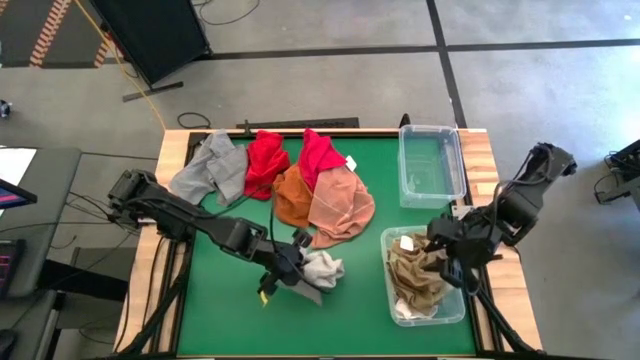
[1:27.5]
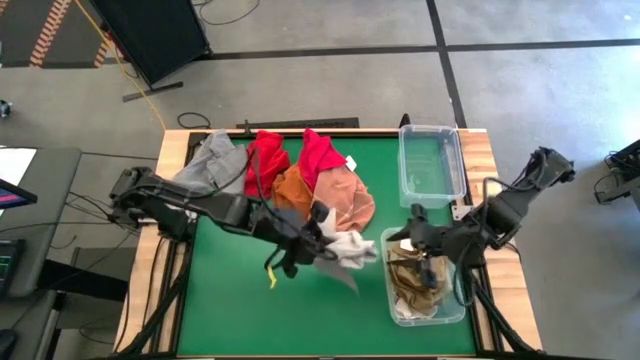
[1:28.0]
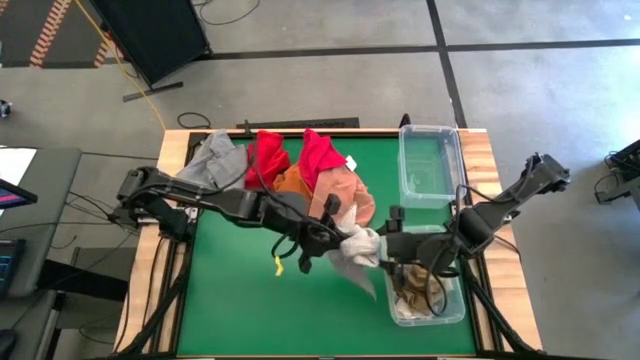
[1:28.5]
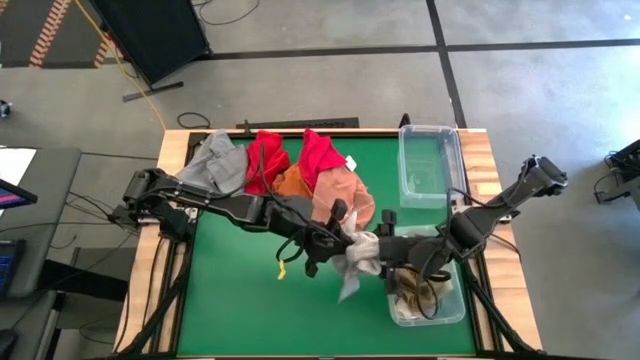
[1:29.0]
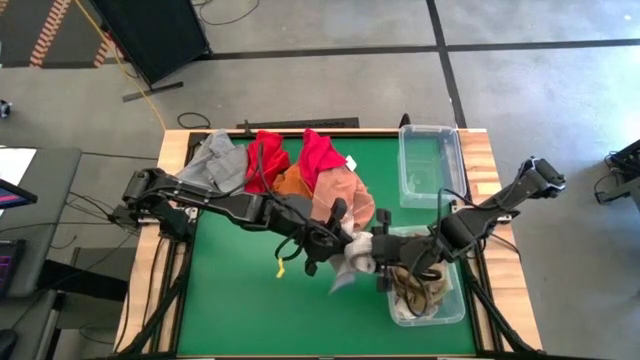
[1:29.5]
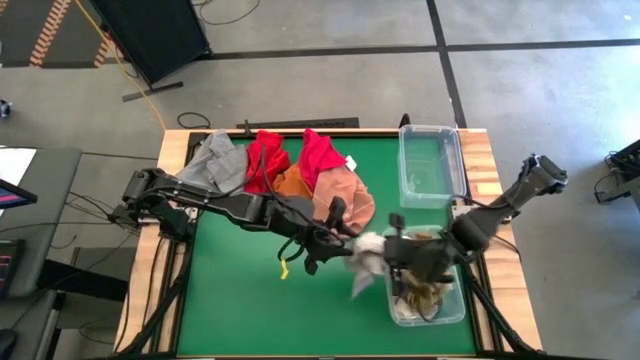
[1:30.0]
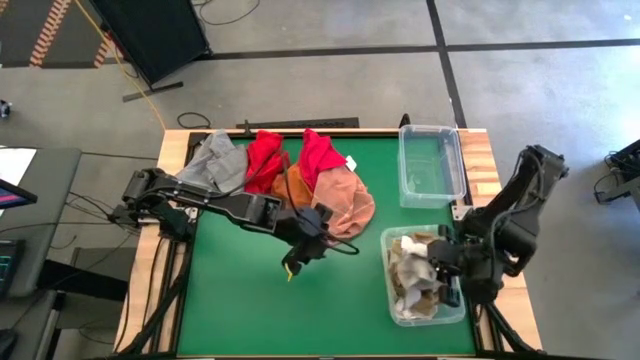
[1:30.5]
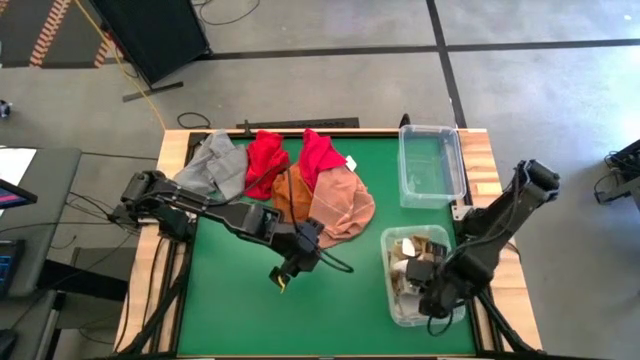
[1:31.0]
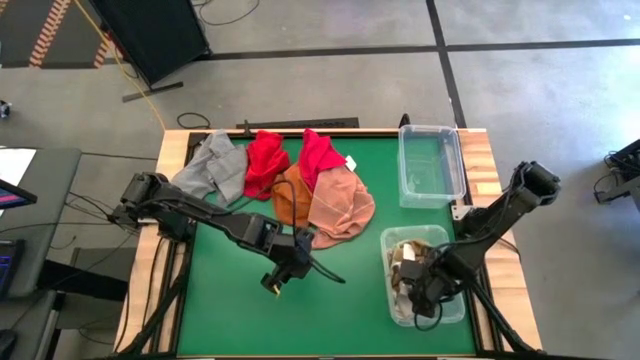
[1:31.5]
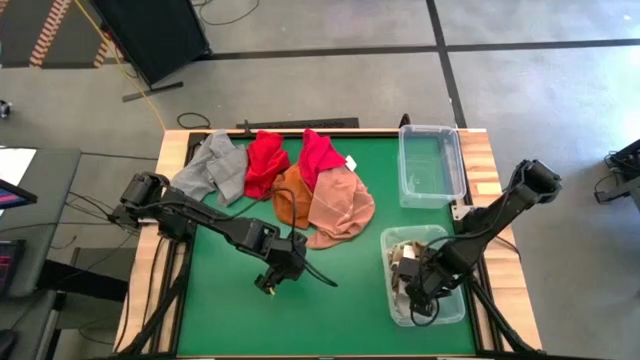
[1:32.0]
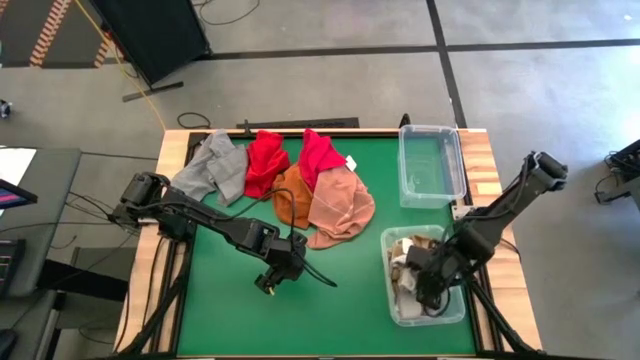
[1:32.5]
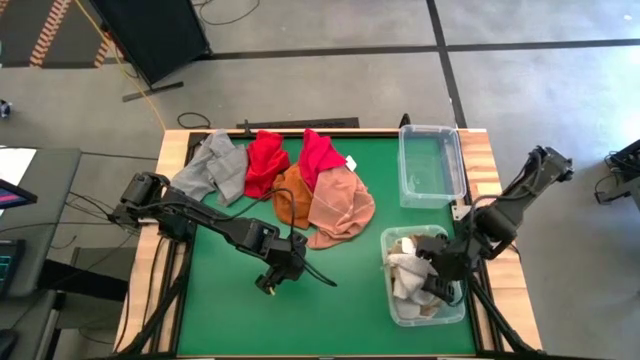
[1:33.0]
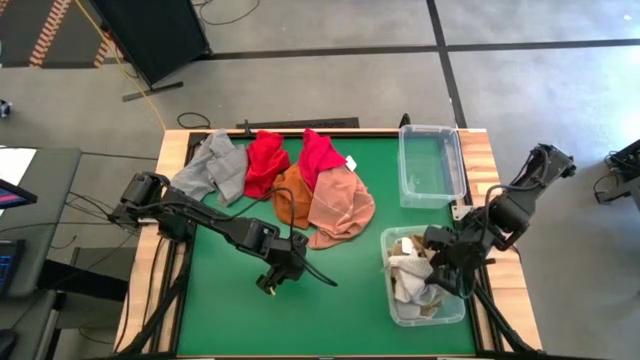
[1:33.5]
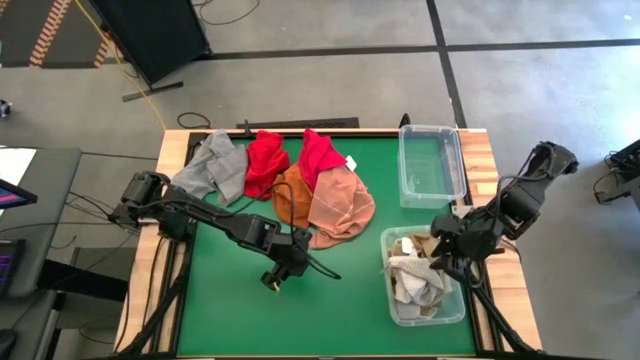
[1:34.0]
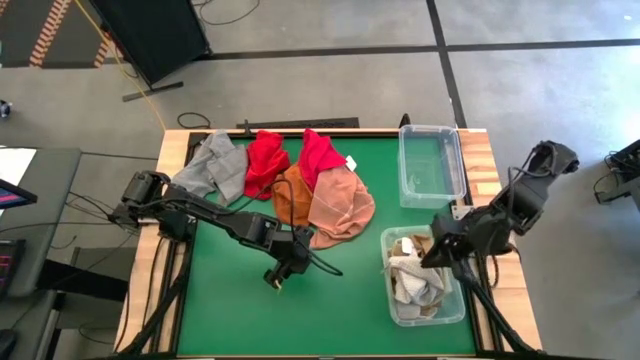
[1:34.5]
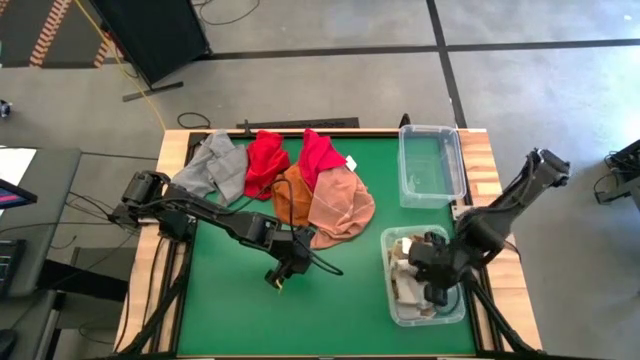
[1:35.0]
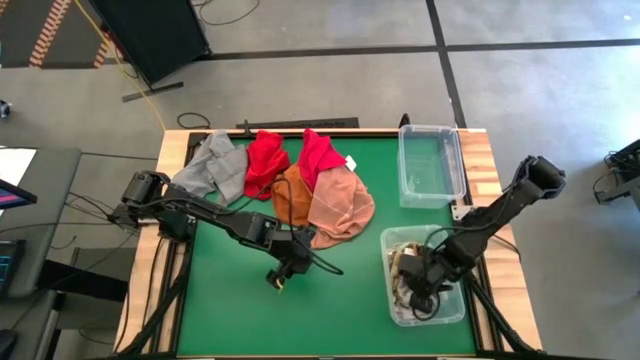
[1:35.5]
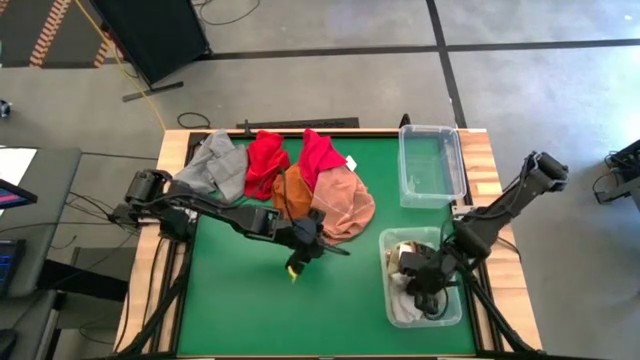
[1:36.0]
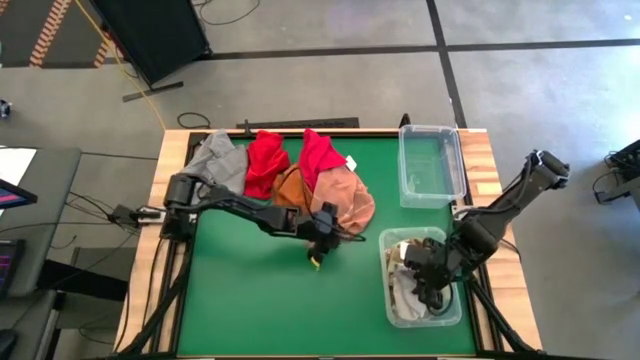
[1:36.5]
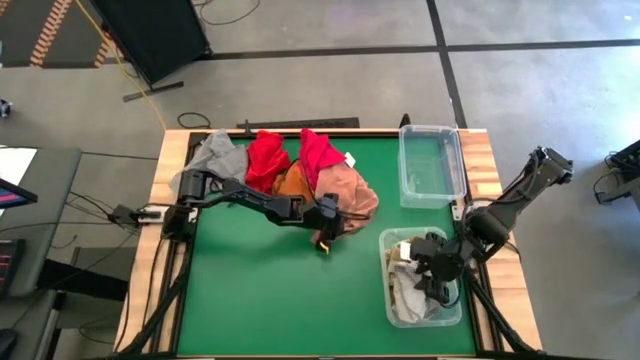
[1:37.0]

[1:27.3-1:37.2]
Task: Sort towels by color in basket
Put the grey towel into the bottom transparent bin

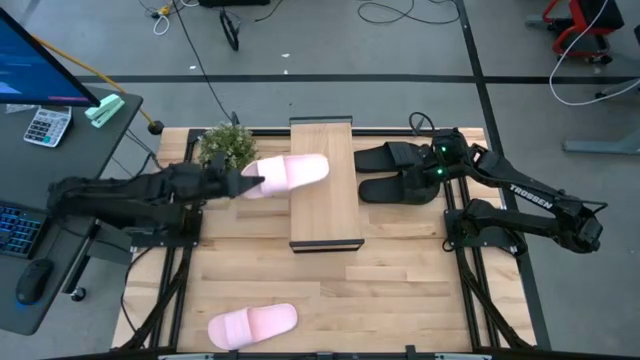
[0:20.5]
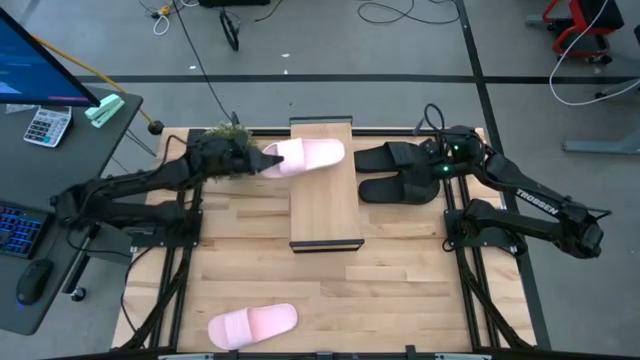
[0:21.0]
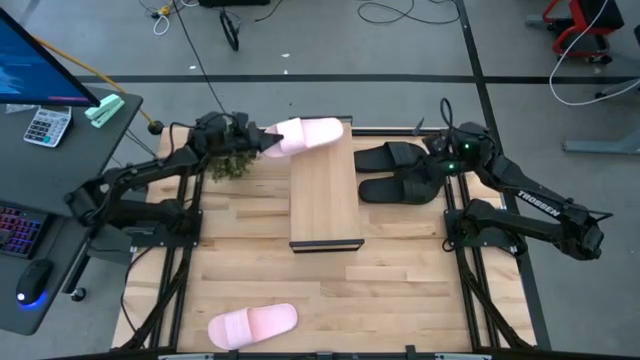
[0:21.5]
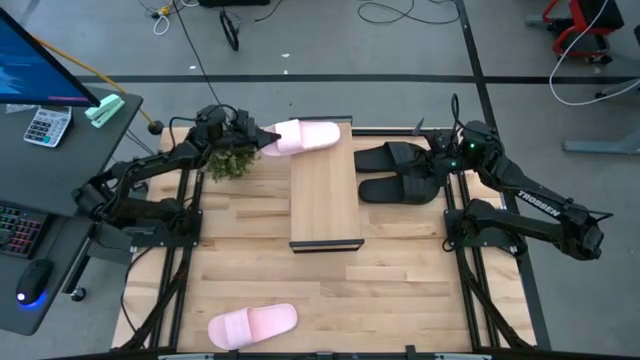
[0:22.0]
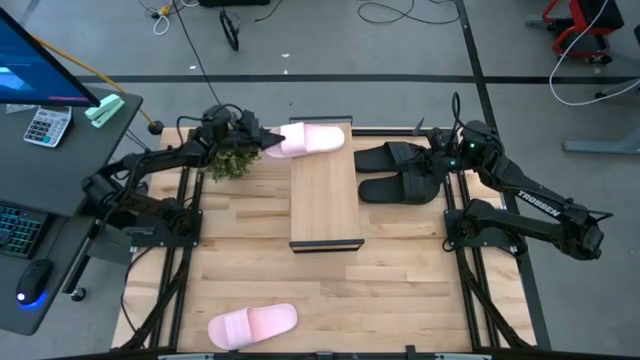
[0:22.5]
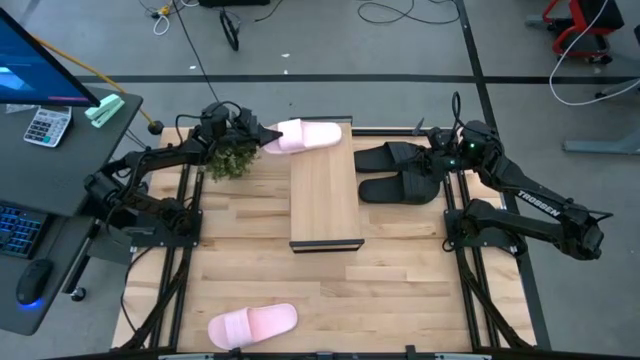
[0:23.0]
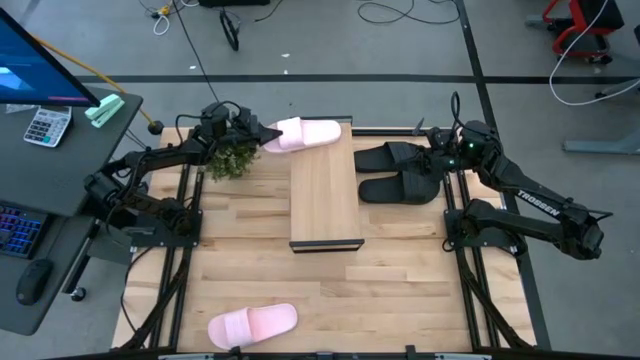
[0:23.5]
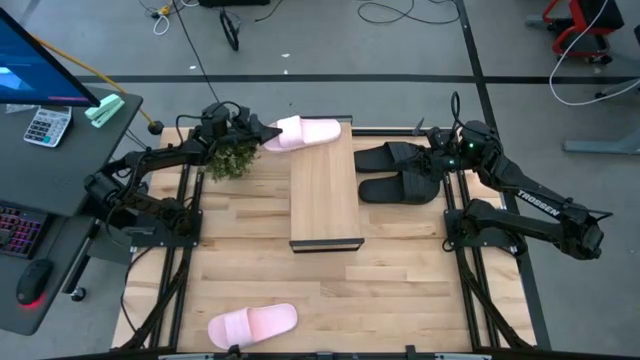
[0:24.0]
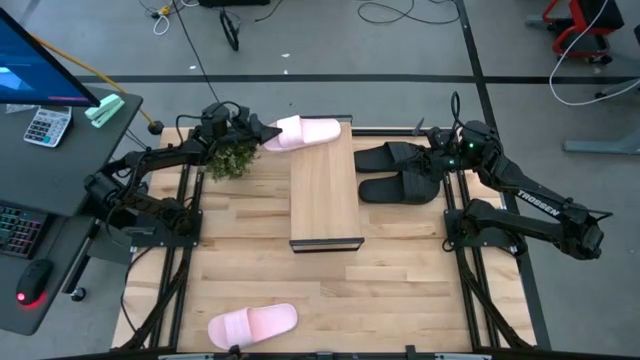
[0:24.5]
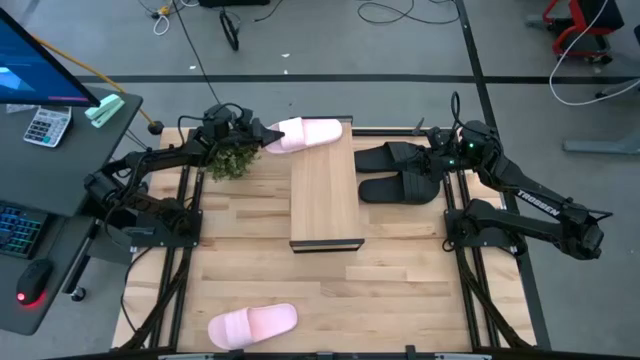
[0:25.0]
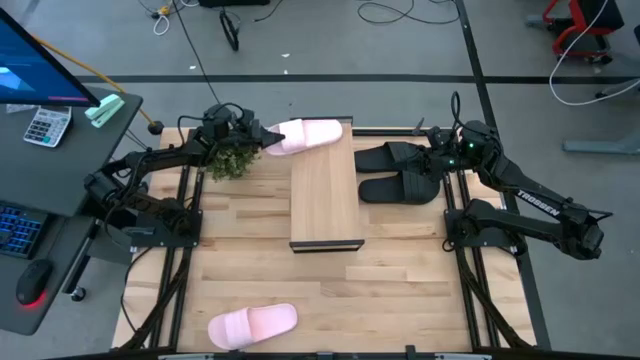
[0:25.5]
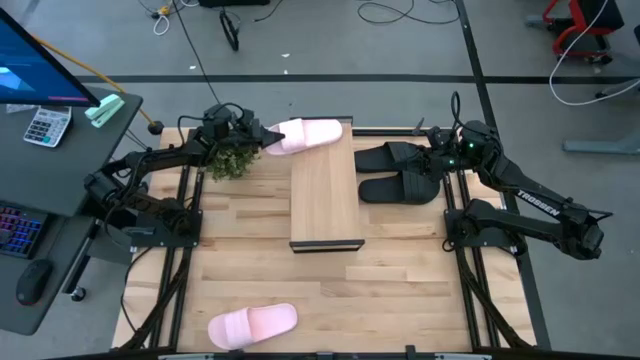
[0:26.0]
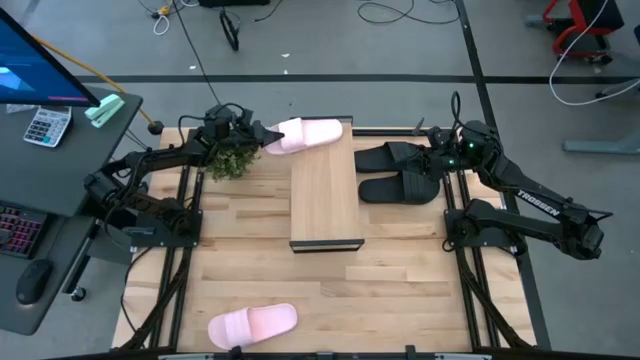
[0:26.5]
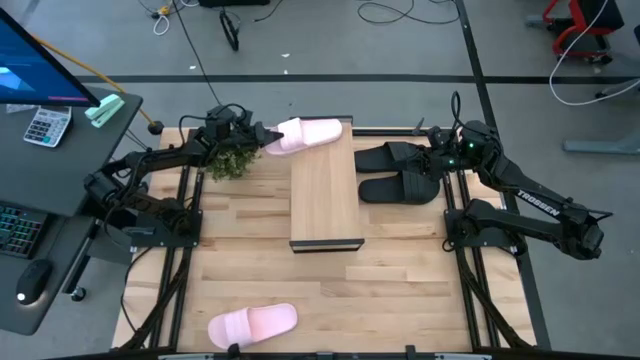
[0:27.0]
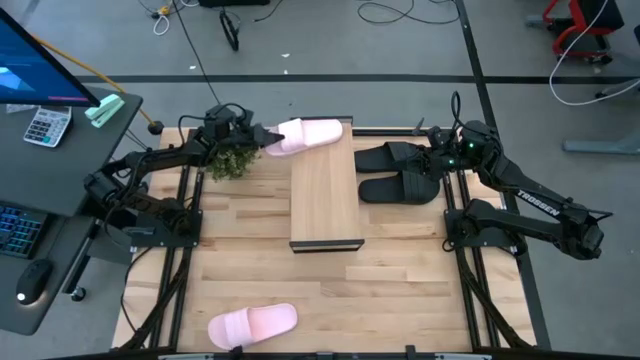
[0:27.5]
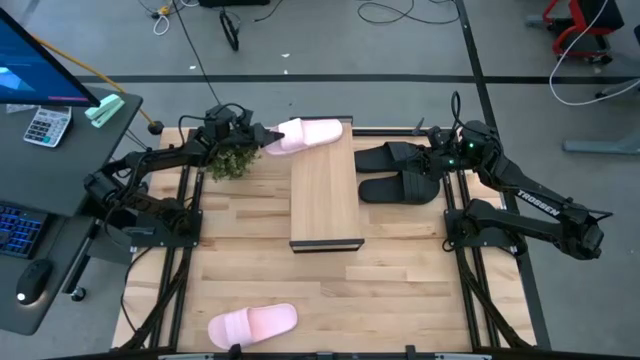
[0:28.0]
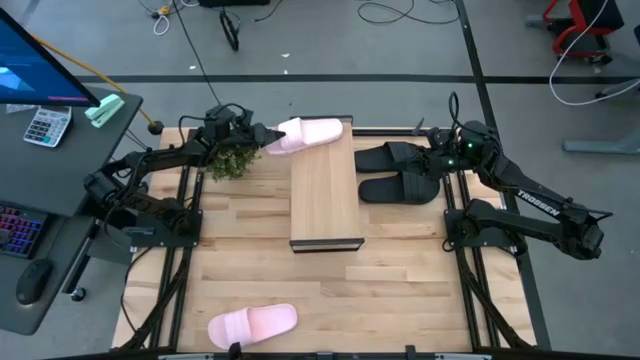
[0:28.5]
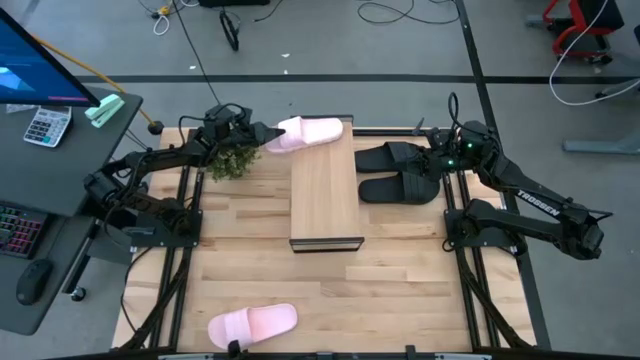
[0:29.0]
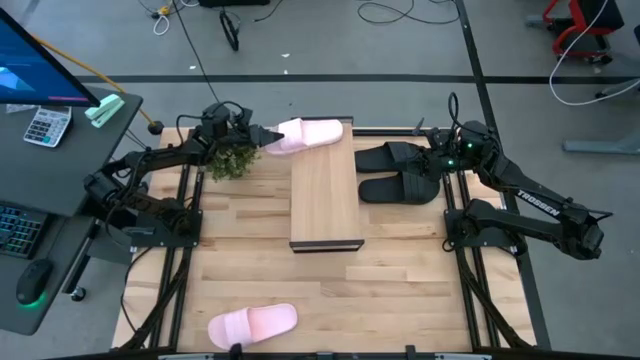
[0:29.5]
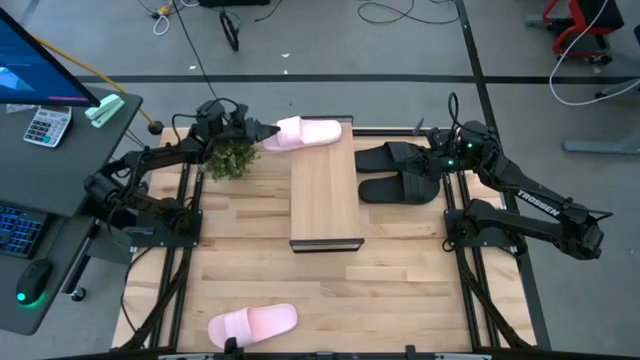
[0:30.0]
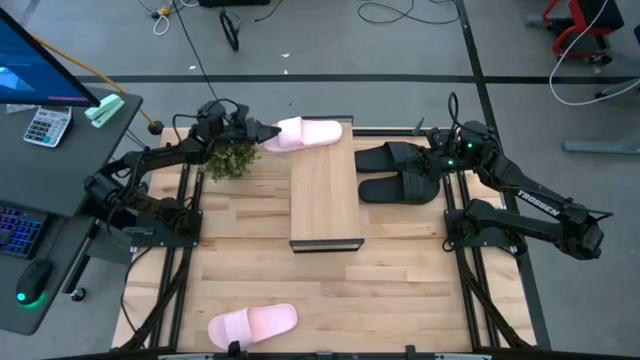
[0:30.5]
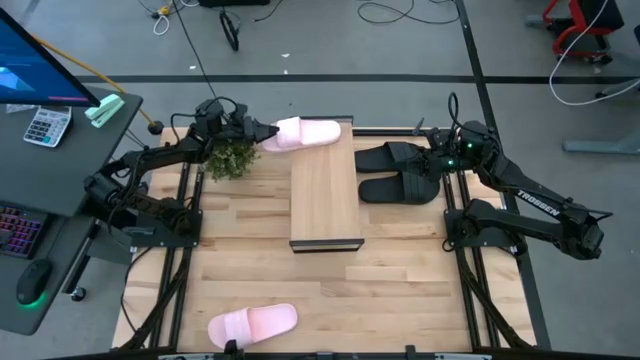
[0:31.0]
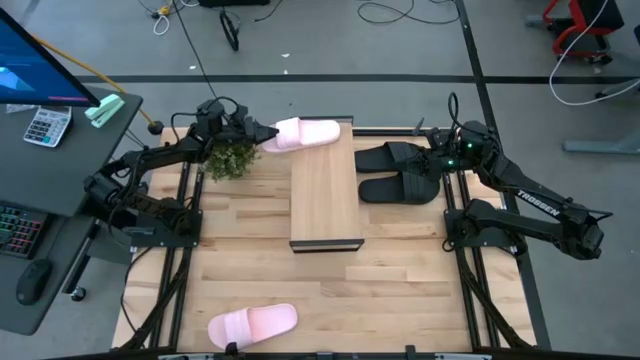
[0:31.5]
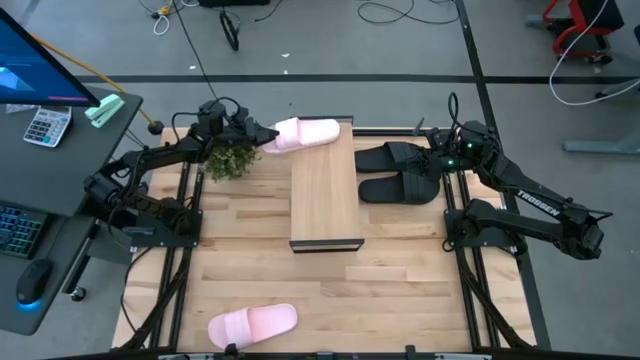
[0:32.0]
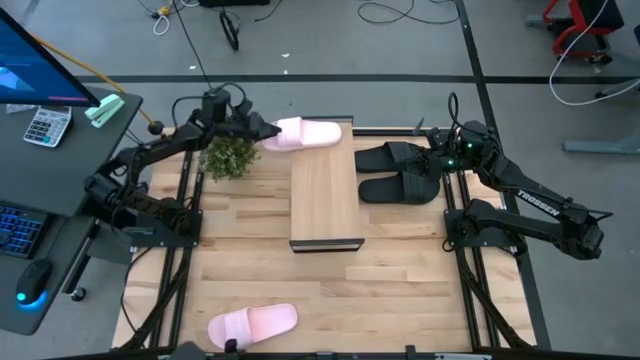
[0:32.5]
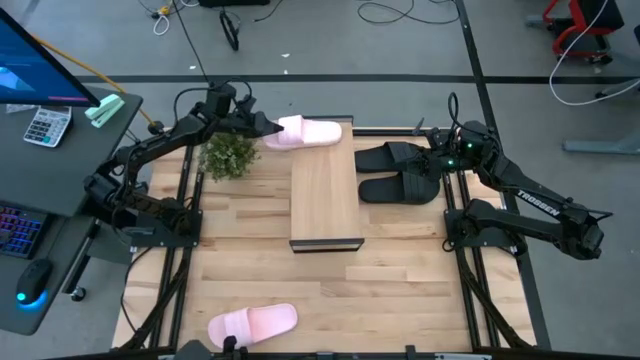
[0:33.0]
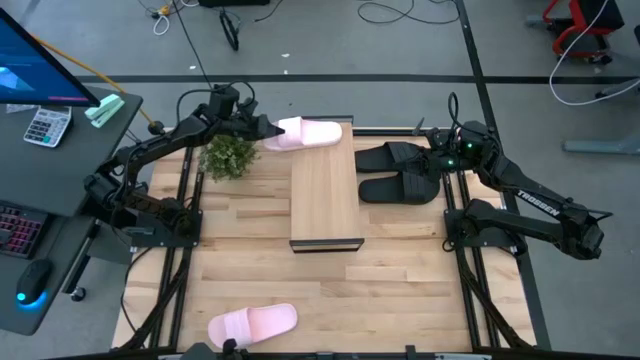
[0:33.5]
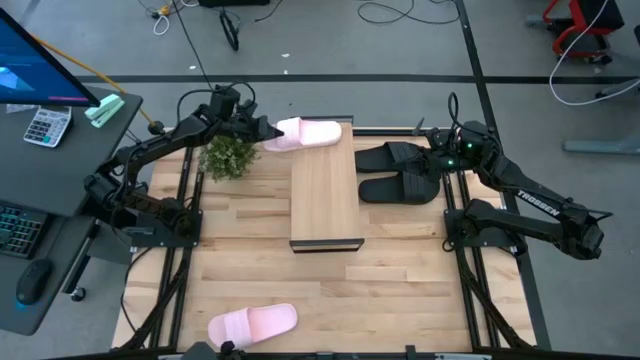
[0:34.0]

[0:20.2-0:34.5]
Task: Pick and place slides into the shelf
Put the top pink slipper on the shelf
